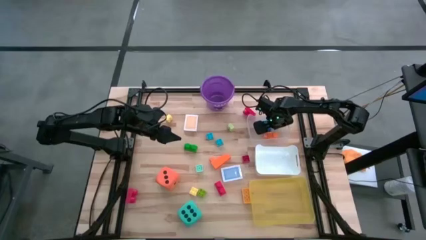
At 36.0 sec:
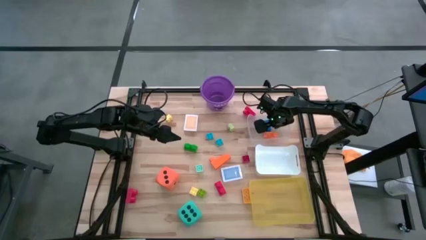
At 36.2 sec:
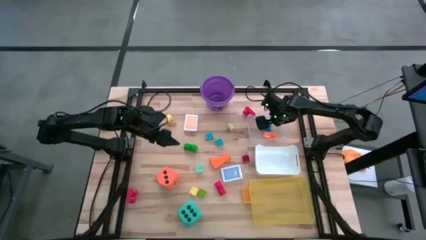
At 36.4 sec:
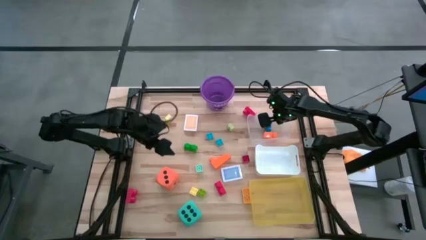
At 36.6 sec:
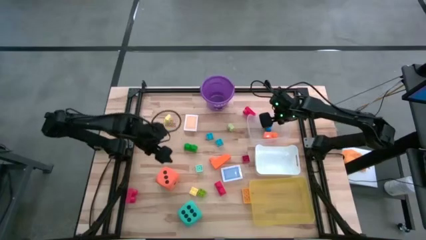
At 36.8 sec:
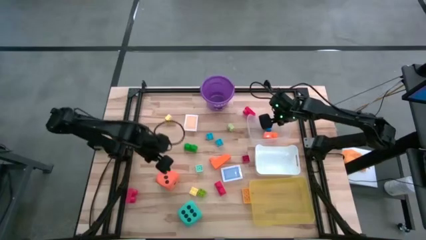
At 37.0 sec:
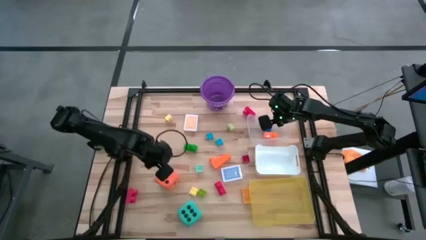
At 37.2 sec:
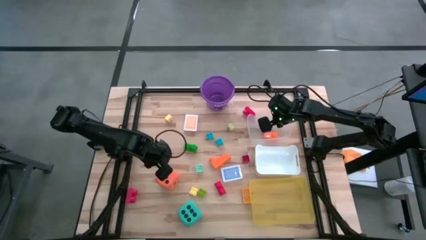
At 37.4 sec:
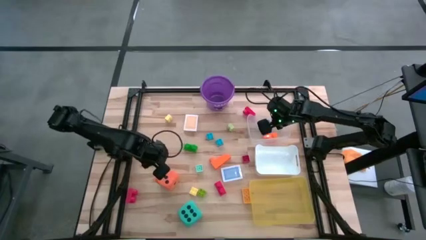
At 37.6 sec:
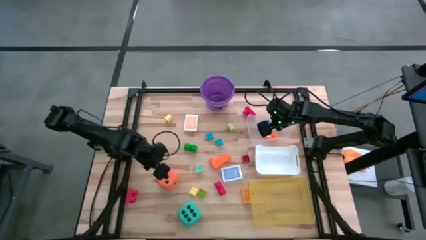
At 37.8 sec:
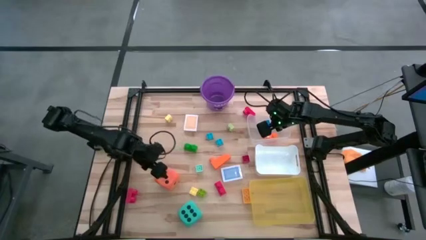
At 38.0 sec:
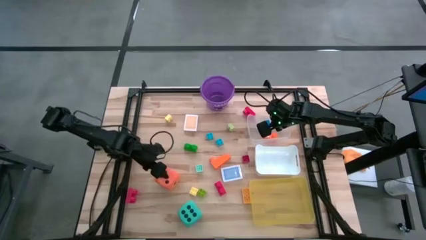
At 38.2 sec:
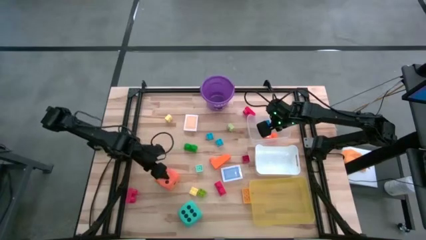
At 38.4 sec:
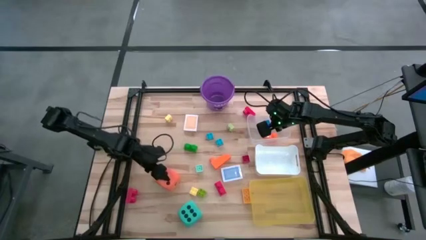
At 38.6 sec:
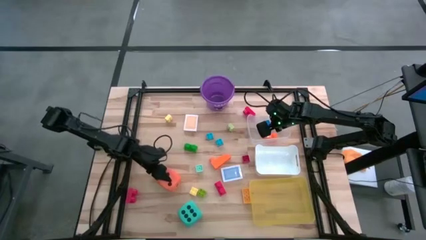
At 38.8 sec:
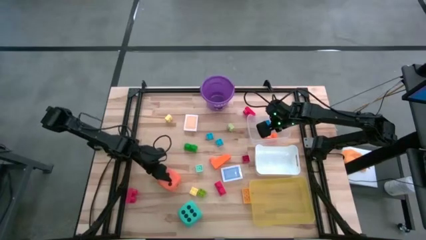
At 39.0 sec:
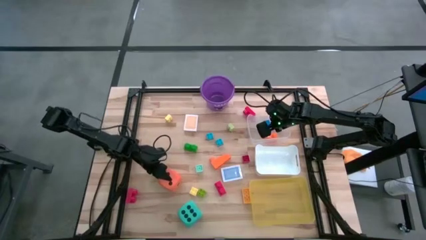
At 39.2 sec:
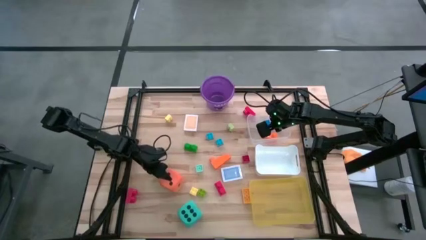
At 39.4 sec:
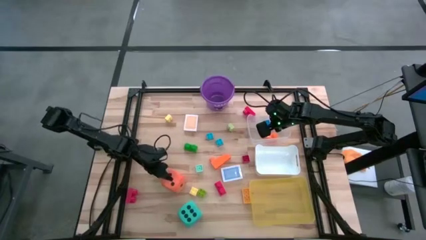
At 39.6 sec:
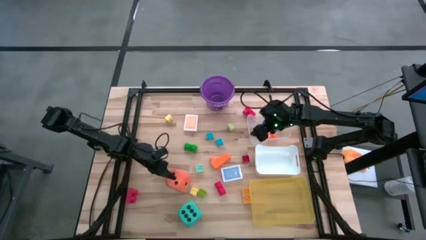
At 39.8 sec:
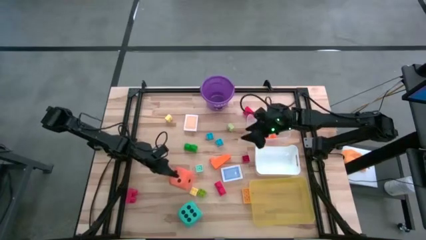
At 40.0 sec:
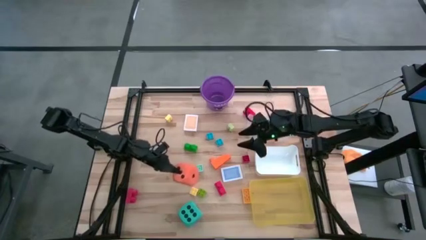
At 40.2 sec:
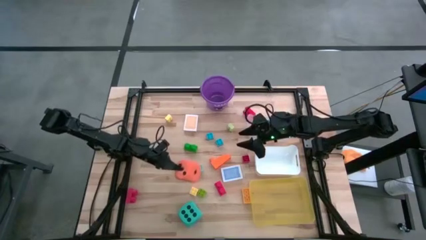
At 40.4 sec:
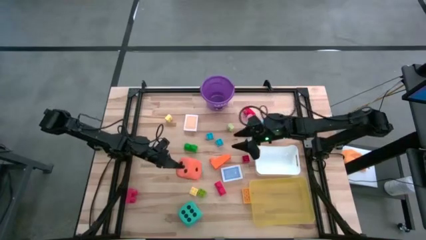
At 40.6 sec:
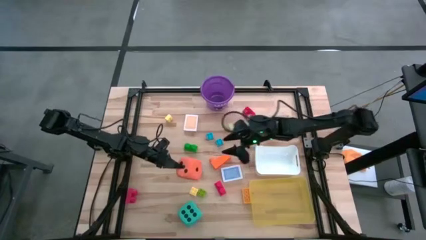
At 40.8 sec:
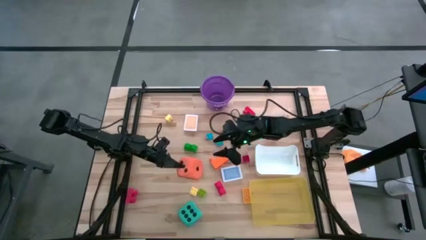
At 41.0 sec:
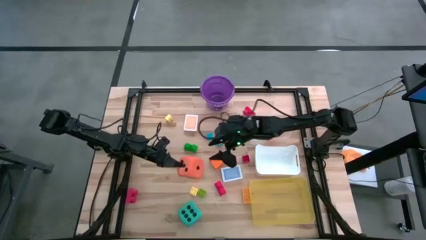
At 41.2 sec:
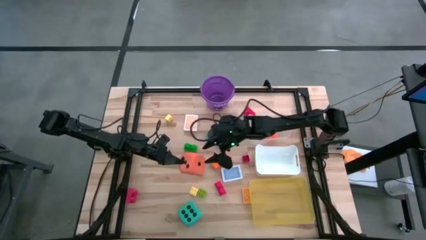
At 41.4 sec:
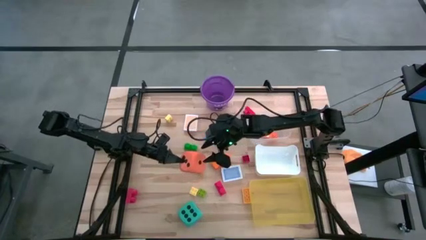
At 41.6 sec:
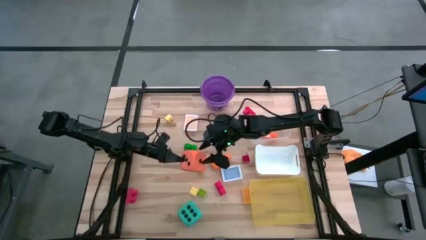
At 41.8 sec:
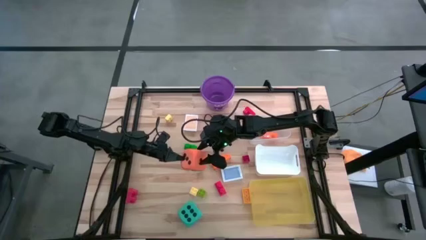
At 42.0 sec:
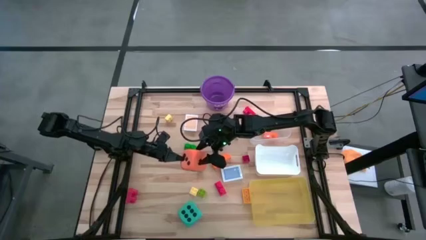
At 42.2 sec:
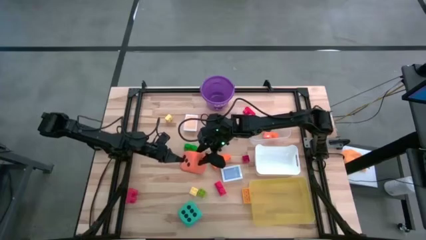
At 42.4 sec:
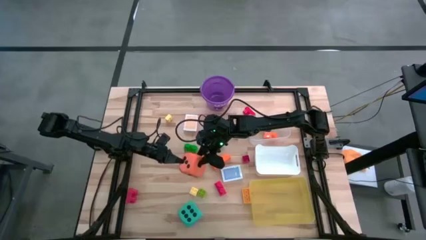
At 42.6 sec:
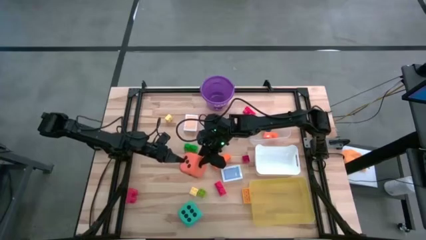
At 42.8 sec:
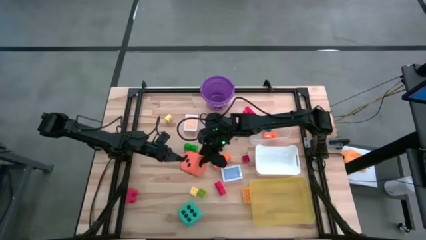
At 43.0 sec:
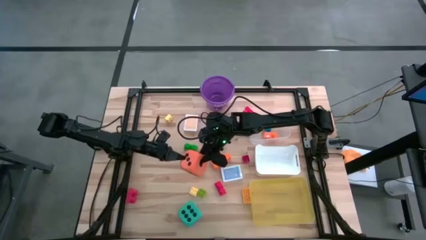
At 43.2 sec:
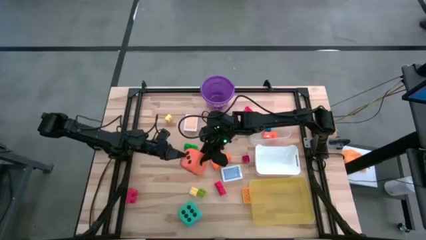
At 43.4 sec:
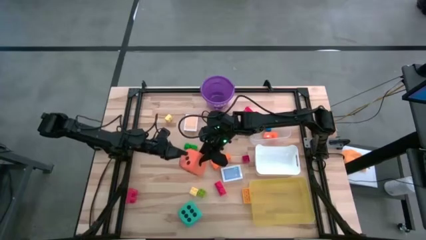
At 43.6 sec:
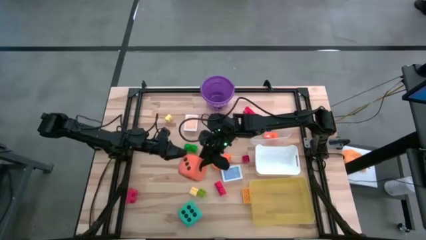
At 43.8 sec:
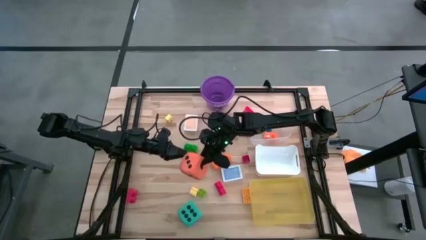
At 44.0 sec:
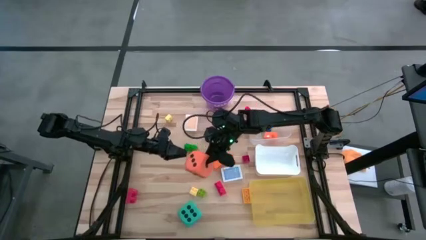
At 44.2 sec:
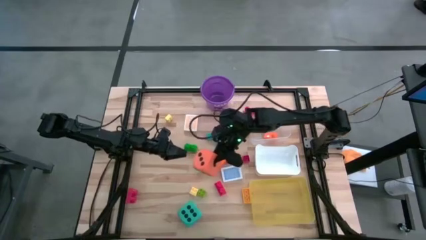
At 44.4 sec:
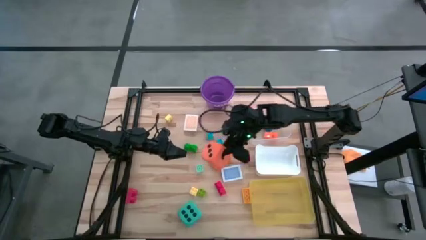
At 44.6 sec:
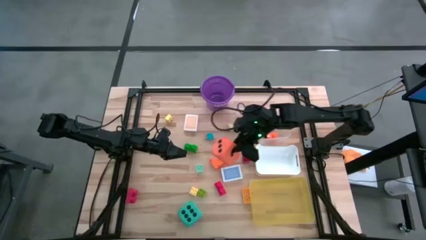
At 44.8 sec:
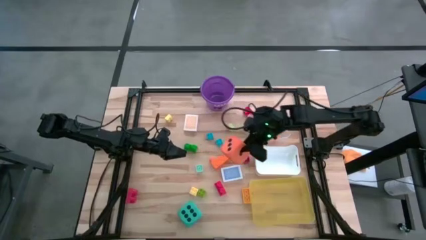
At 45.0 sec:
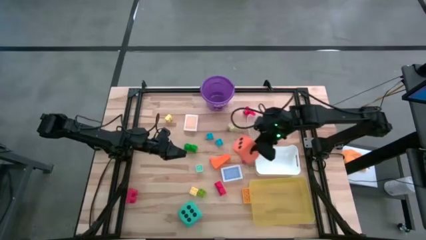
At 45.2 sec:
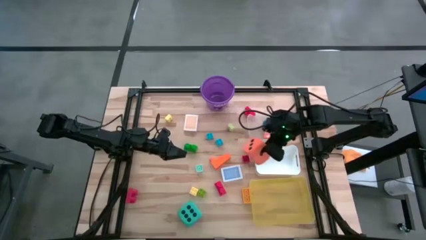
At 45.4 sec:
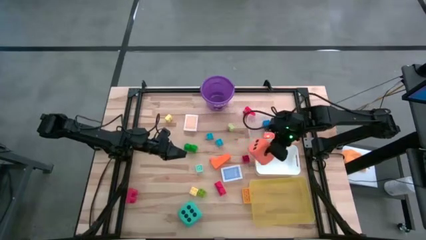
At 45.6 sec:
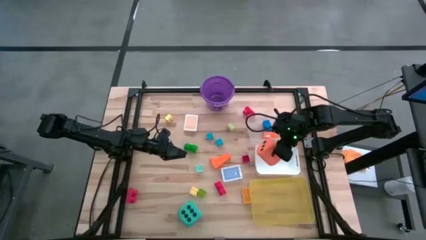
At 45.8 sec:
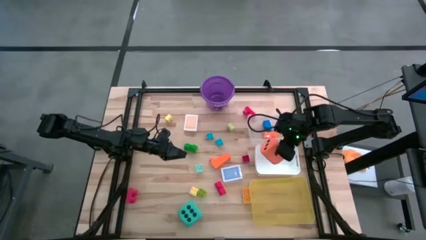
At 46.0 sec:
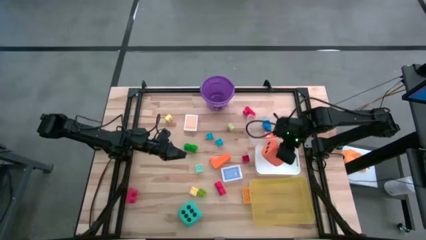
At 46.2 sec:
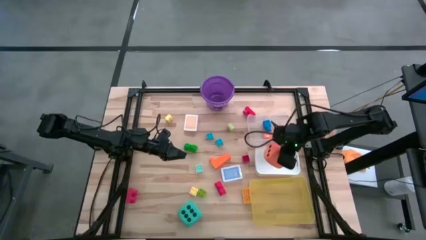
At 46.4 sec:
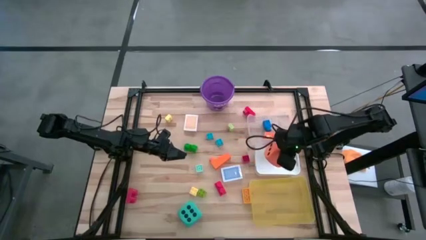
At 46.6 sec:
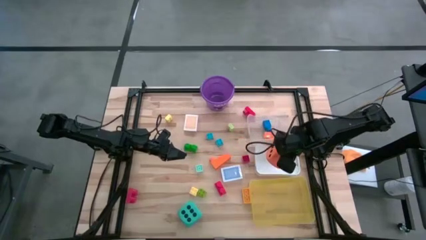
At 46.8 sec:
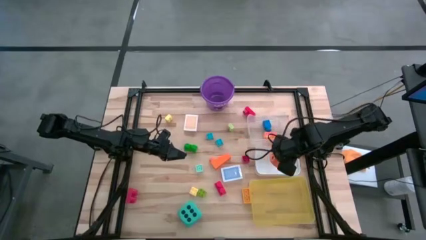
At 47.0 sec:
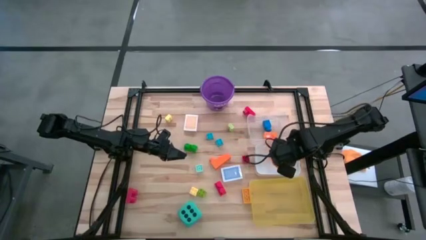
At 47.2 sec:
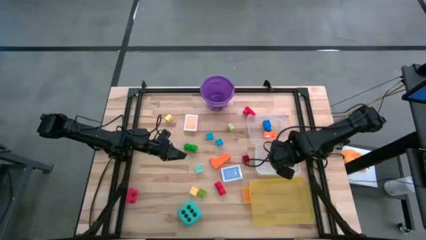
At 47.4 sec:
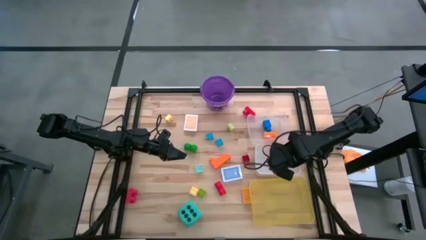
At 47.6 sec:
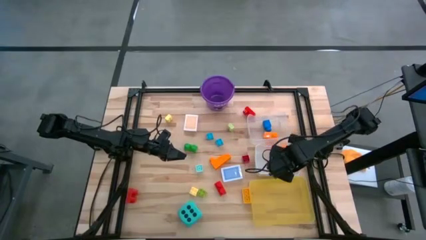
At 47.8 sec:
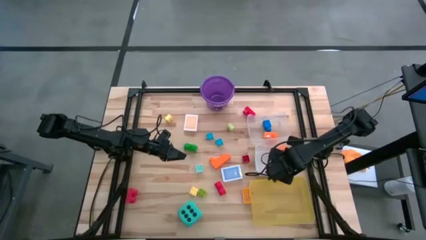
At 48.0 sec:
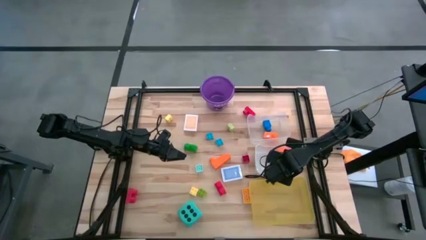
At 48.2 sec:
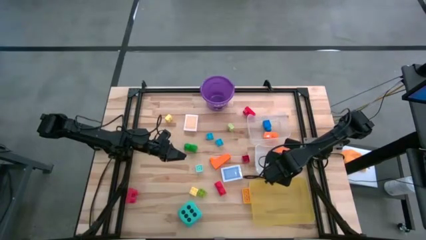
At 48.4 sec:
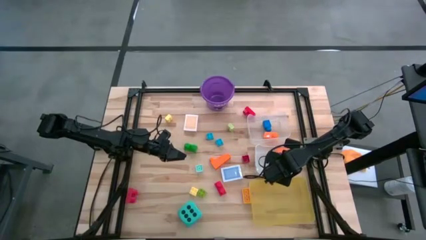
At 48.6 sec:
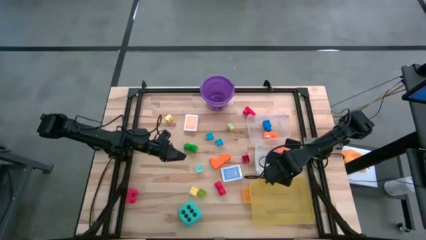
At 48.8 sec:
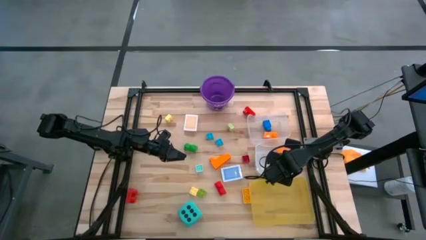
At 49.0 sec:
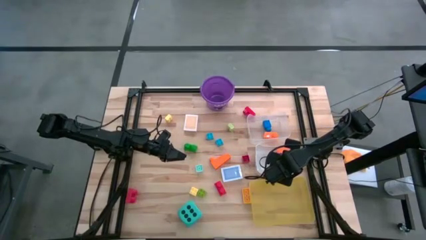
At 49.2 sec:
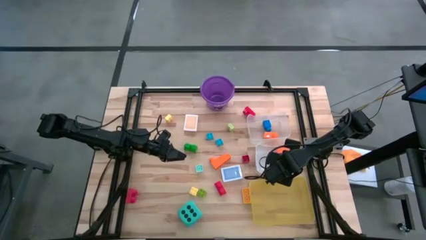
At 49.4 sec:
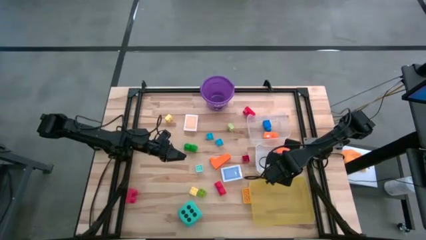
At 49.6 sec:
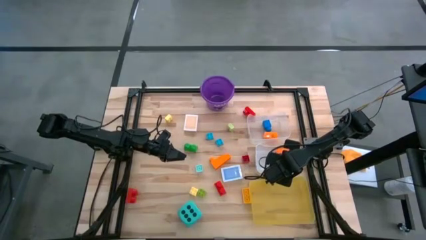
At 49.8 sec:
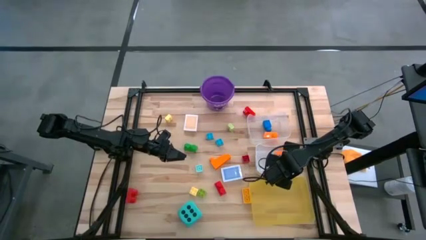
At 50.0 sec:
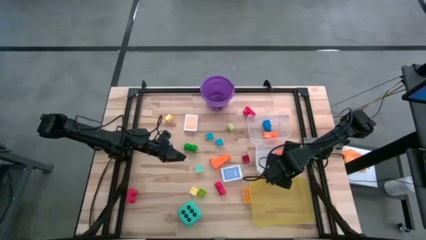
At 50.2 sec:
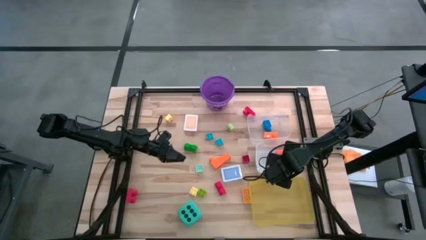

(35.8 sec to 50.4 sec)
Task: Pick & Place Toys
Put the orange dice into the white bin
